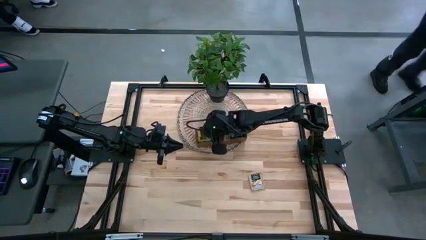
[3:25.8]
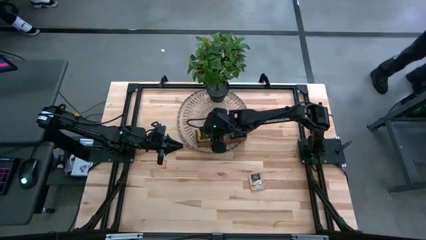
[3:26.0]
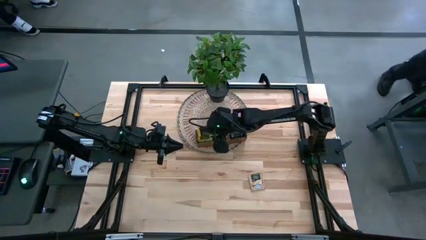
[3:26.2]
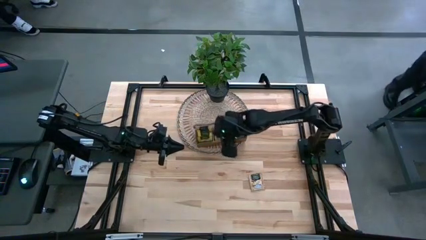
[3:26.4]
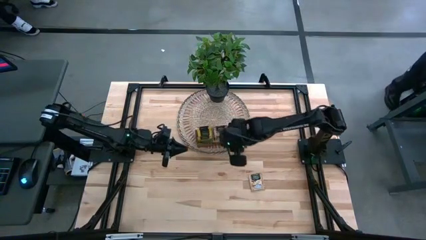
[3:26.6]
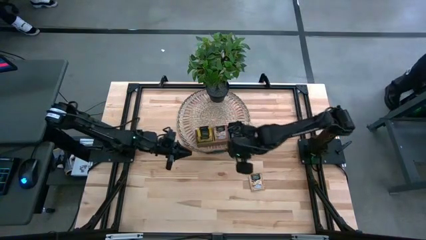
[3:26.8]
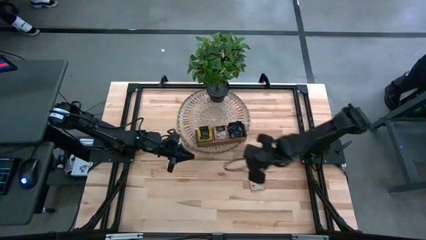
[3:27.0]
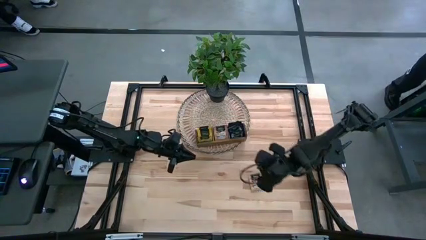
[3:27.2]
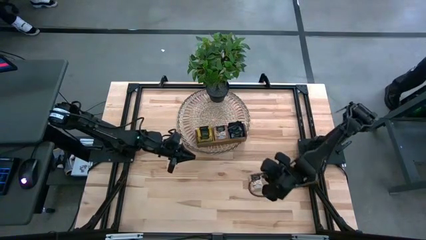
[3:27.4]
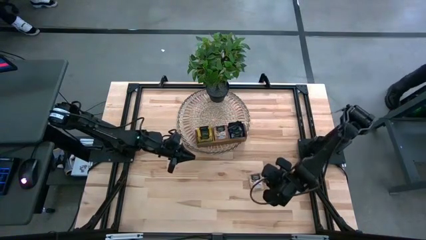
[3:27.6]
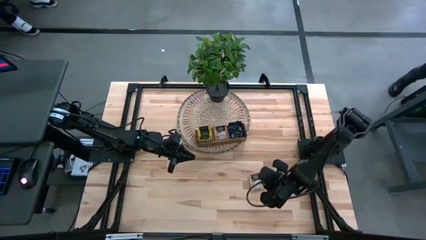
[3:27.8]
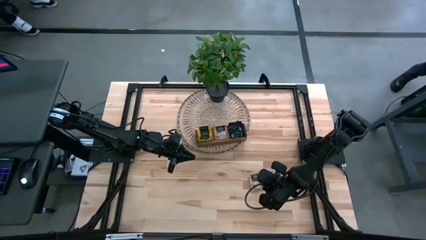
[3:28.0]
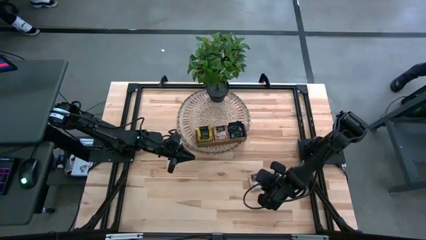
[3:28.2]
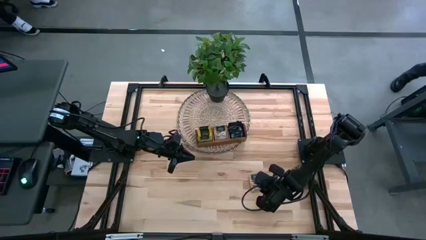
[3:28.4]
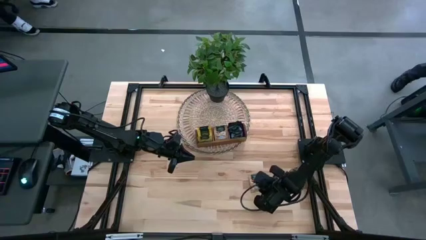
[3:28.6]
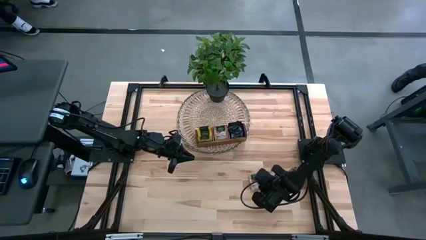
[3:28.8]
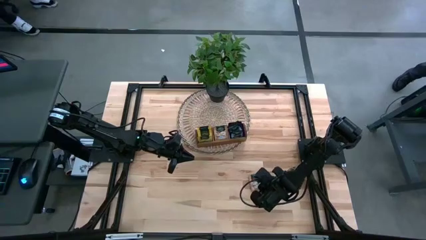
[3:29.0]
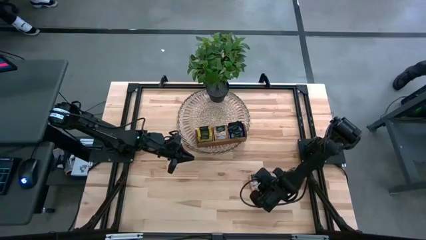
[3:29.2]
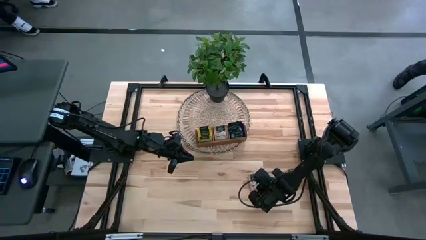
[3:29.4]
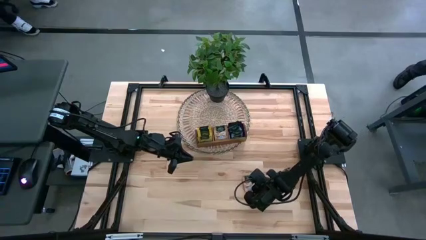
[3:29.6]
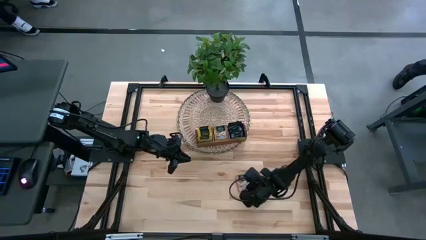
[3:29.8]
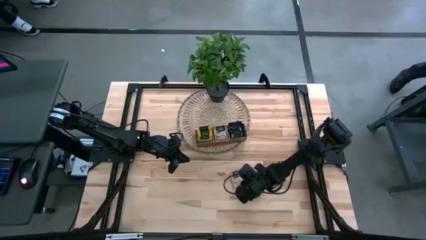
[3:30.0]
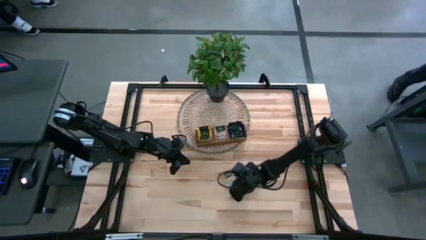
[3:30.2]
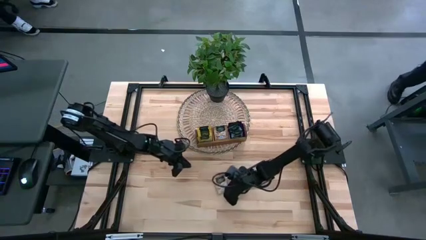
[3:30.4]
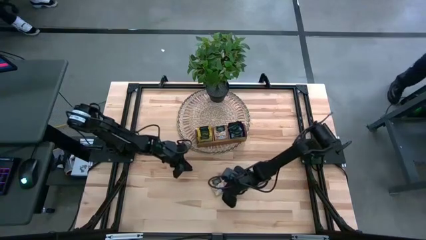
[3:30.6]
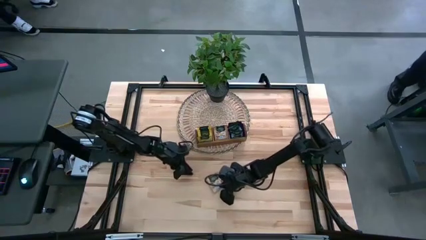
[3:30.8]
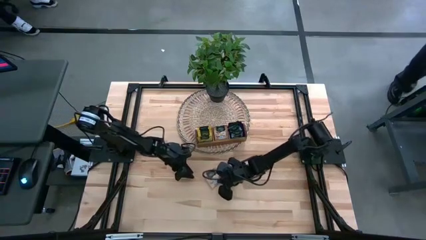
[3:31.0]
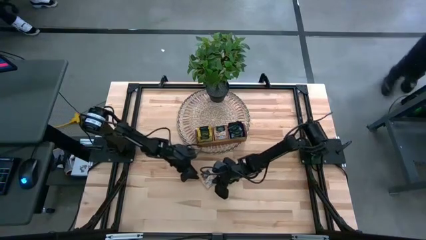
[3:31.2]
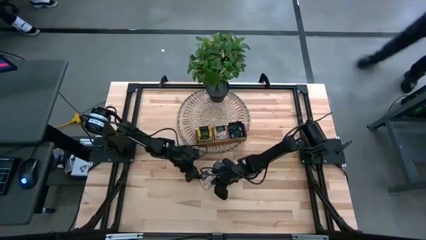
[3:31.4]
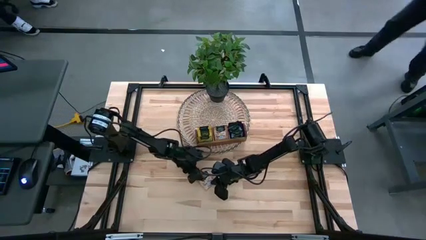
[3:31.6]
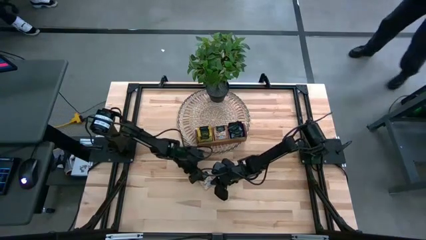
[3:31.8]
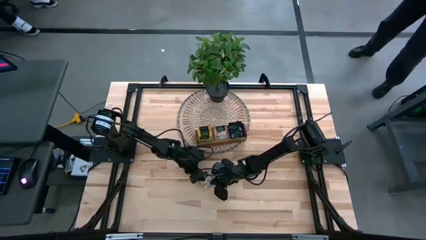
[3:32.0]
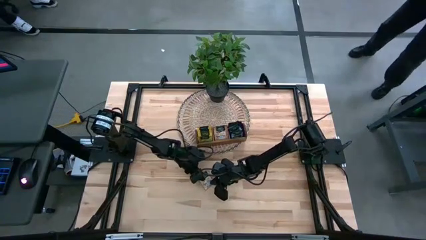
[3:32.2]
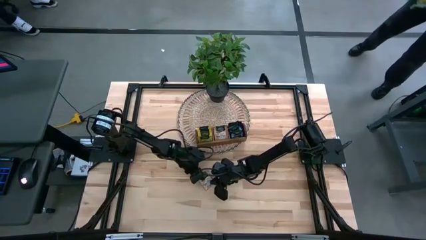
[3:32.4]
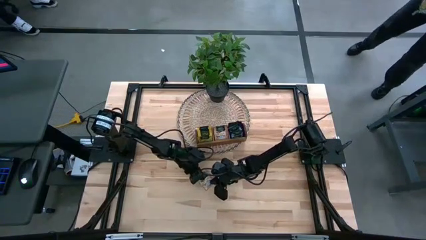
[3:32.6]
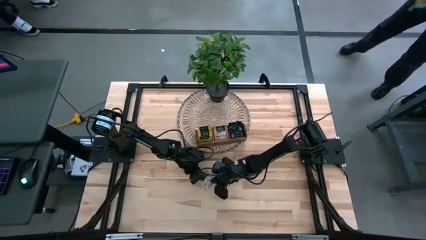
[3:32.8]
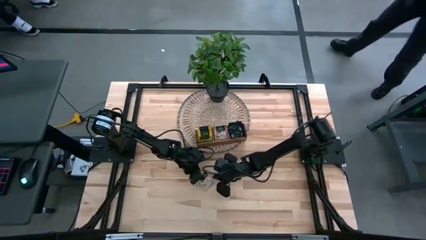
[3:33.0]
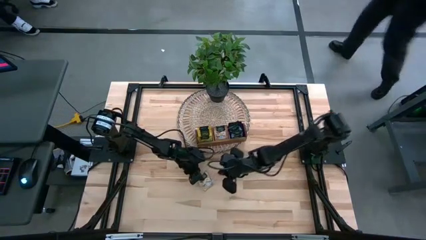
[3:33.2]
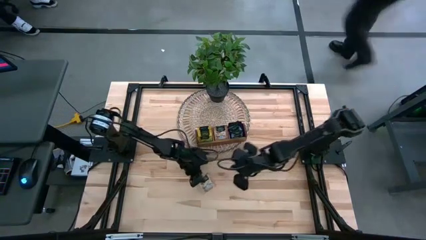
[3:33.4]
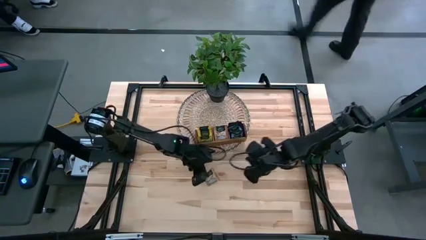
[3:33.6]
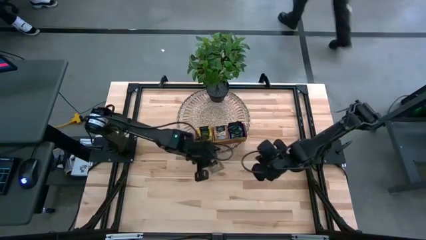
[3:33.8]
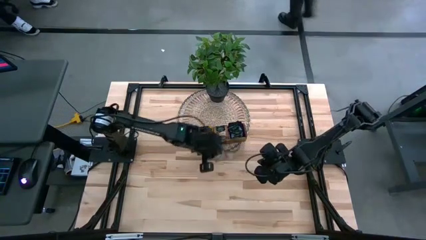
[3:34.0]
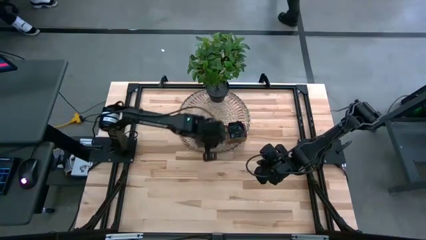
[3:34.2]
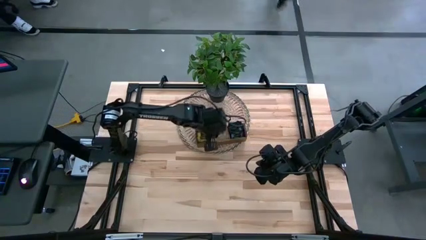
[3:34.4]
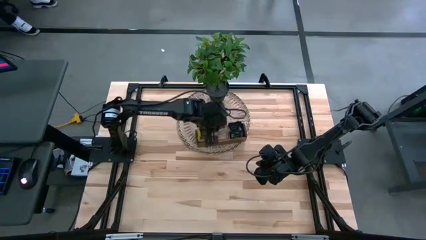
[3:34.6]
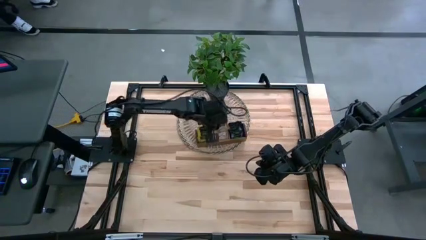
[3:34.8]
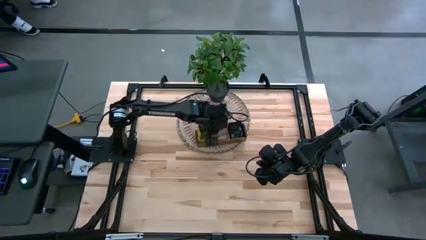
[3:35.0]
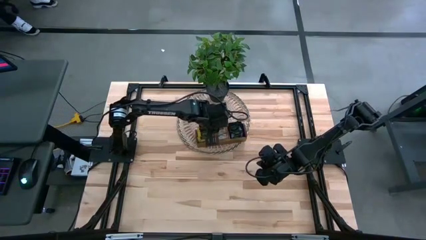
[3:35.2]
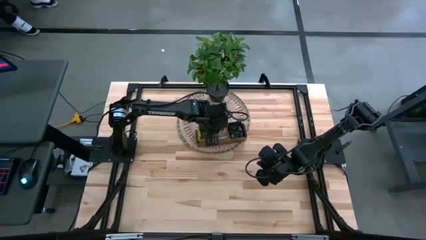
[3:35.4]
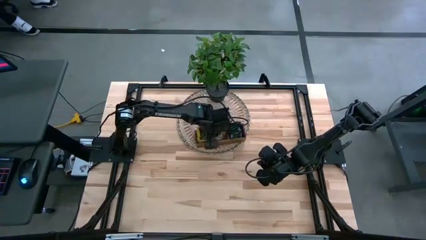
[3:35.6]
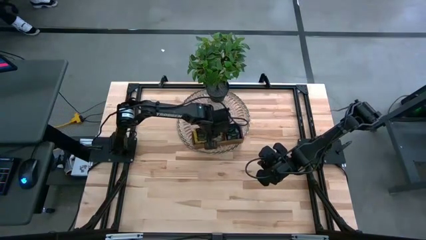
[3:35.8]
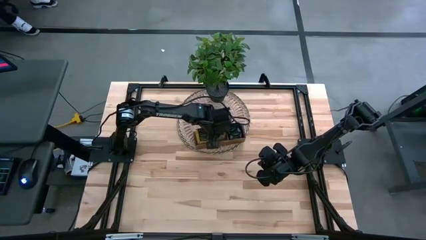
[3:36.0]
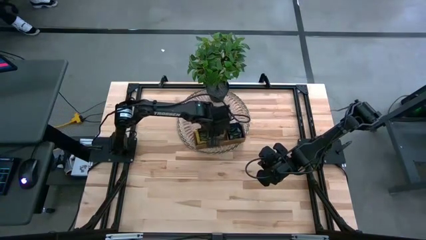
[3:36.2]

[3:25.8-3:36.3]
Task: Pick & Place Tea
Put the brown tea bag into the middle section of the wooden organizer

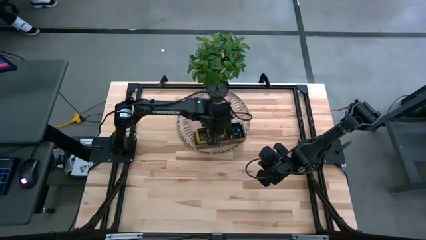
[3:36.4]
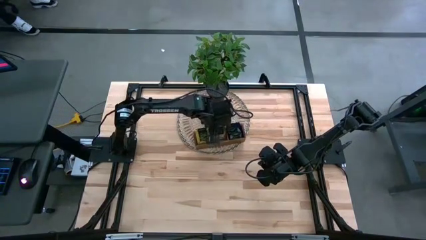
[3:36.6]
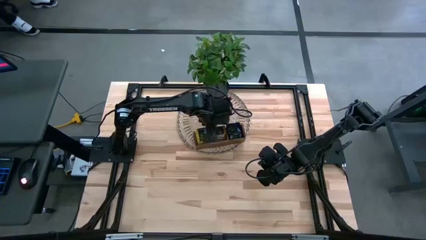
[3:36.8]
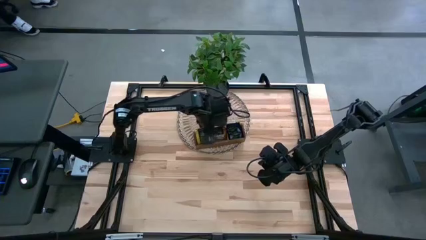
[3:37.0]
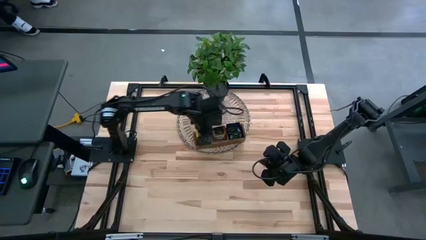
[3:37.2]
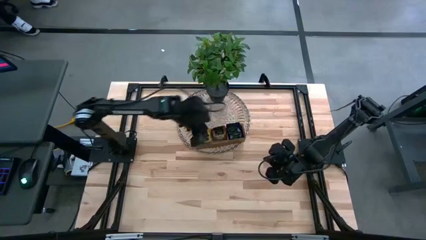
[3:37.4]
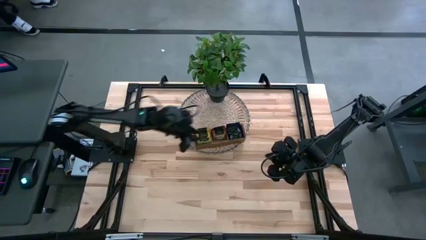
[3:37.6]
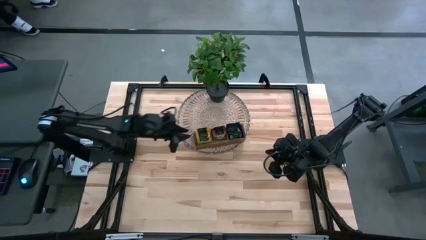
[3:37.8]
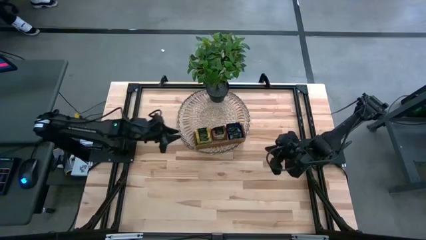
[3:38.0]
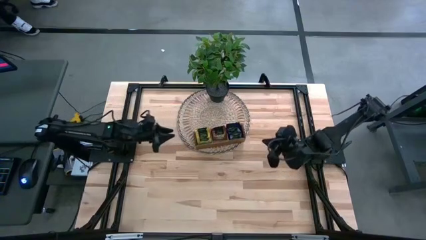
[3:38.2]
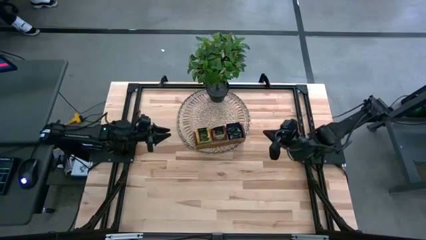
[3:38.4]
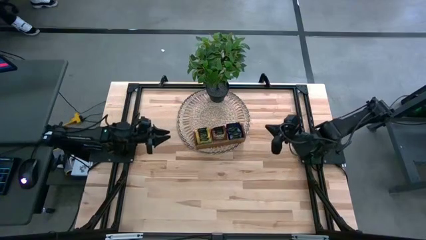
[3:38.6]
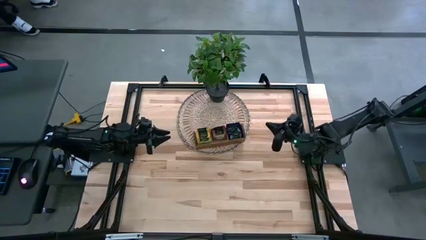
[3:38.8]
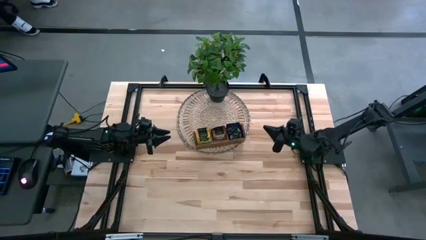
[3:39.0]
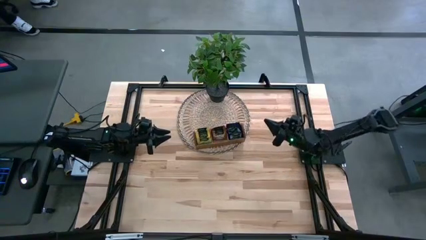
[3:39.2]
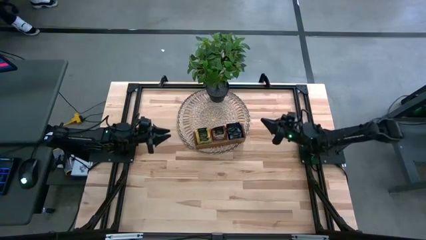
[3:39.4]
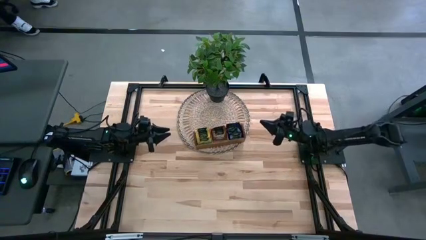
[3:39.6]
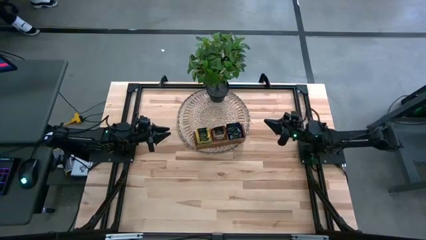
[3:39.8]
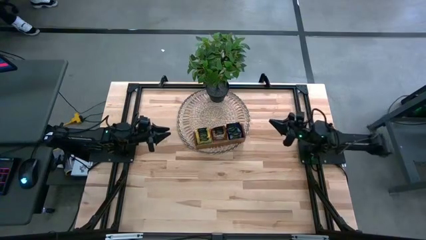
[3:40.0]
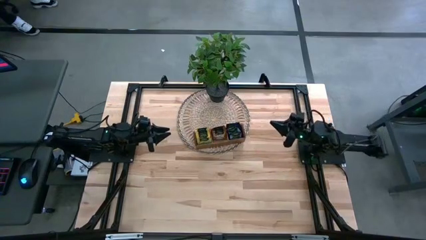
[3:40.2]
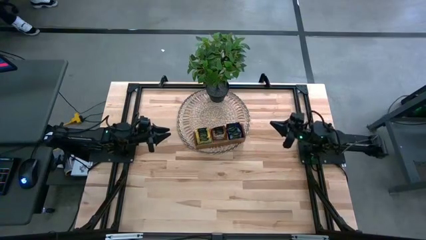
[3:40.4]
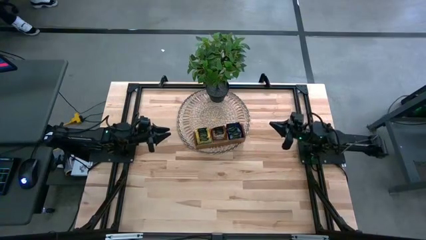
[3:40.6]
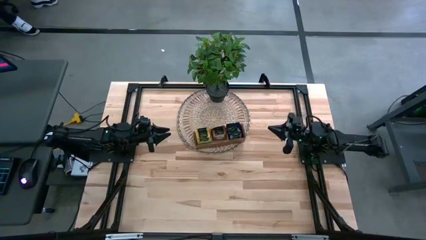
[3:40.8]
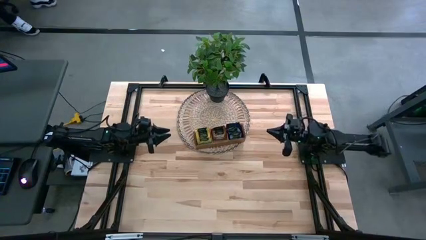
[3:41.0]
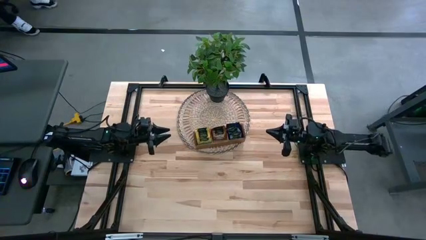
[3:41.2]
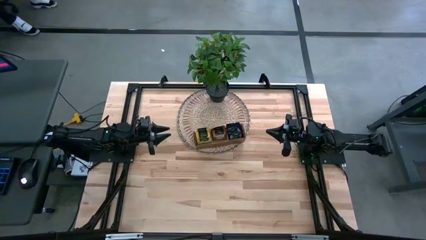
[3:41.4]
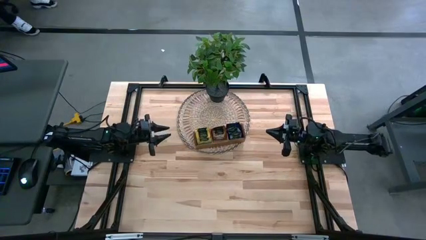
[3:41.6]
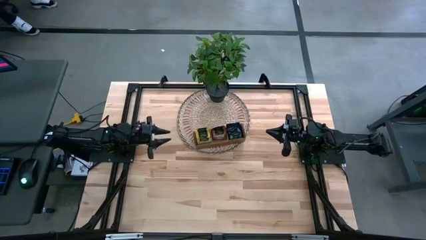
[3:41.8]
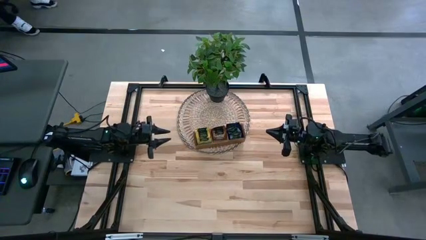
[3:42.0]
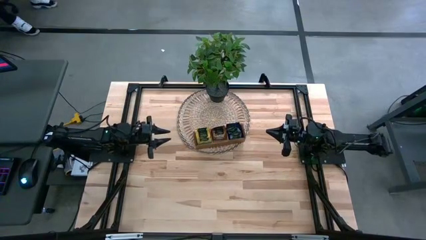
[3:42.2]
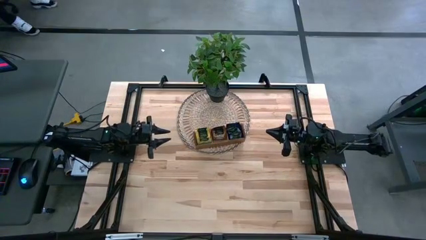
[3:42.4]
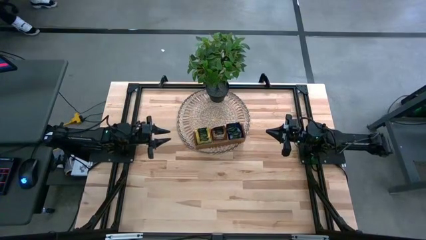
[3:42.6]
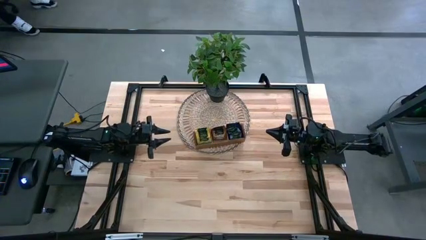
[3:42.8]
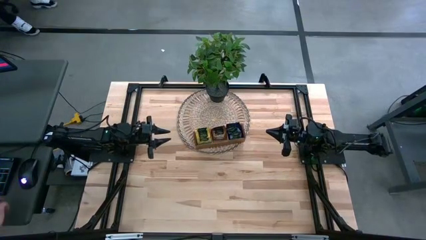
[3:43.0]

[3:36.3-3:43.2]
Return To Home Position
